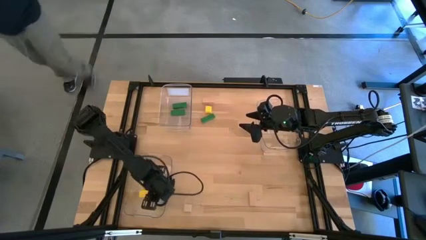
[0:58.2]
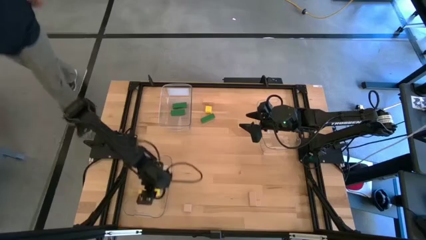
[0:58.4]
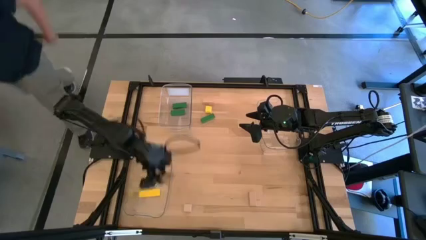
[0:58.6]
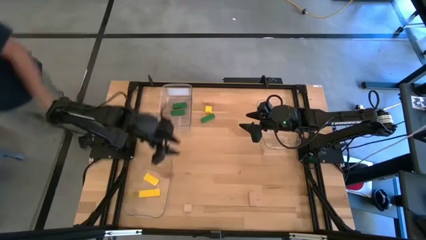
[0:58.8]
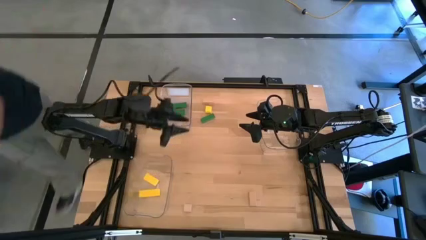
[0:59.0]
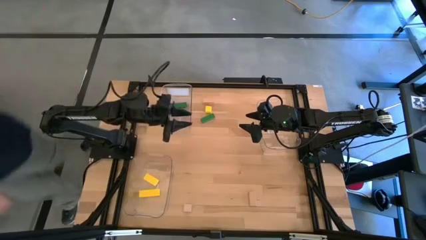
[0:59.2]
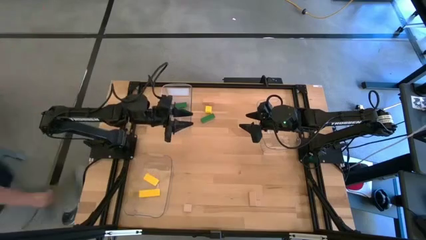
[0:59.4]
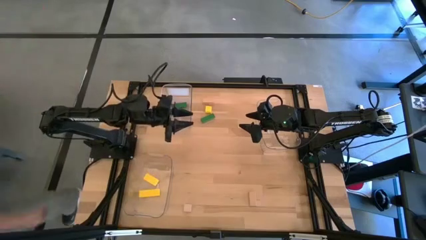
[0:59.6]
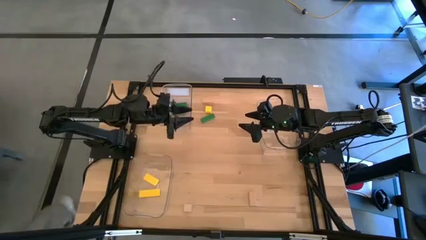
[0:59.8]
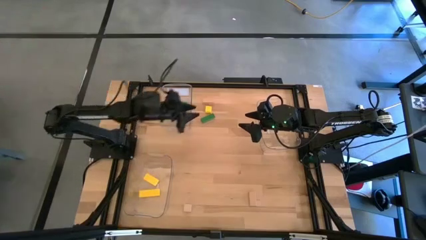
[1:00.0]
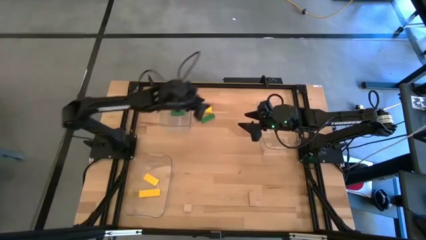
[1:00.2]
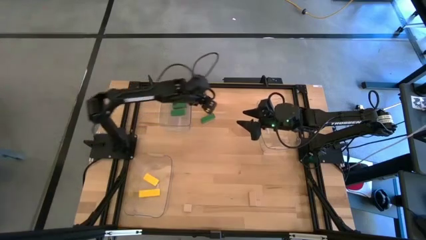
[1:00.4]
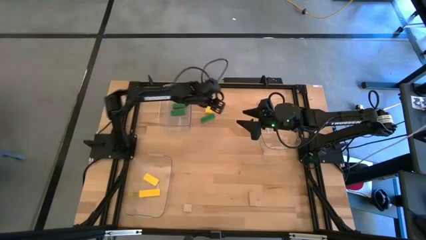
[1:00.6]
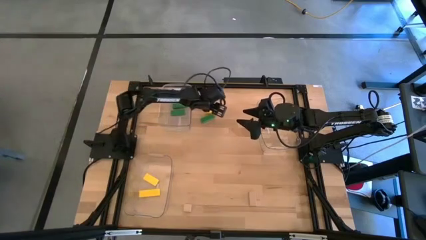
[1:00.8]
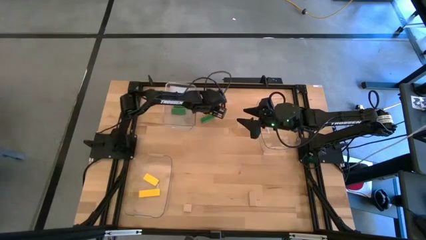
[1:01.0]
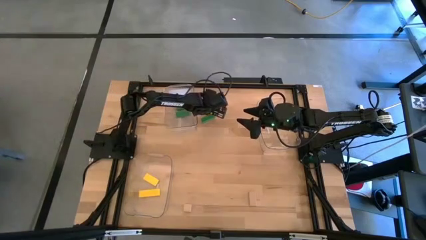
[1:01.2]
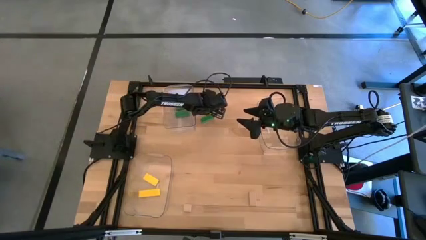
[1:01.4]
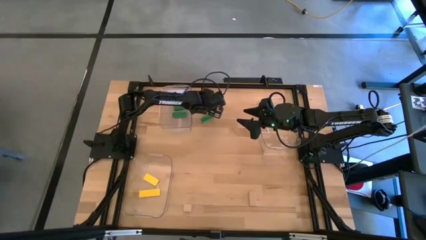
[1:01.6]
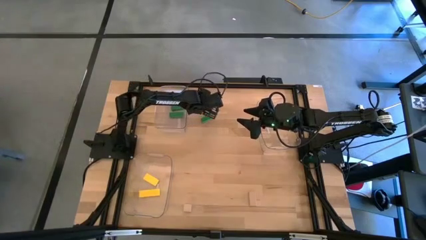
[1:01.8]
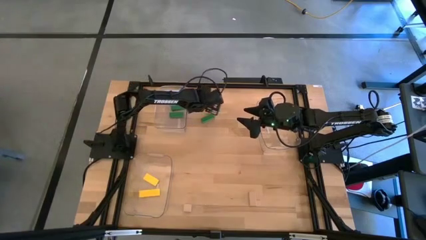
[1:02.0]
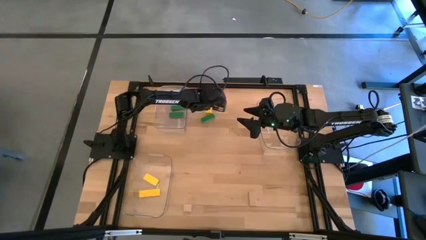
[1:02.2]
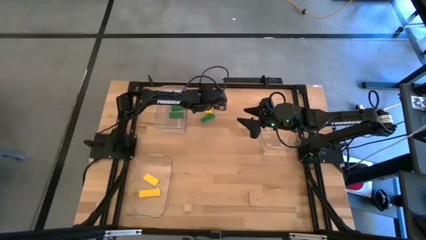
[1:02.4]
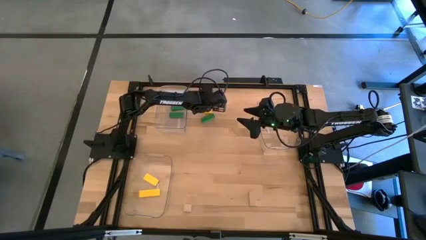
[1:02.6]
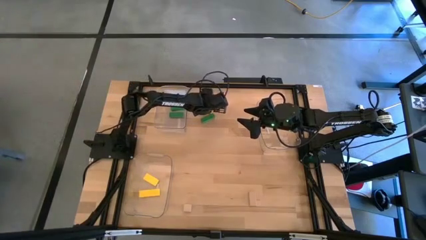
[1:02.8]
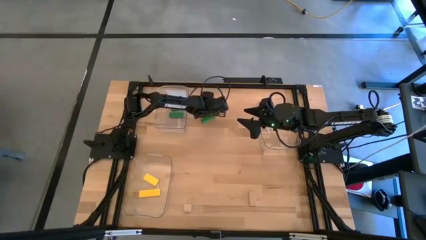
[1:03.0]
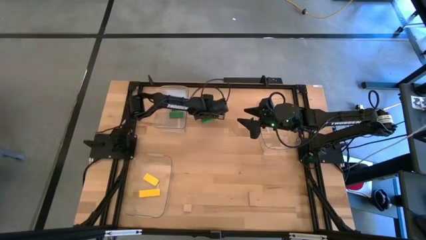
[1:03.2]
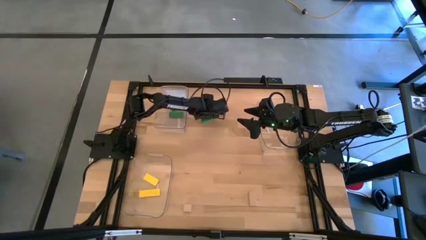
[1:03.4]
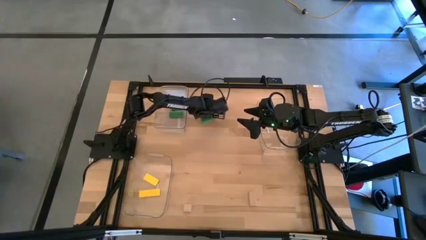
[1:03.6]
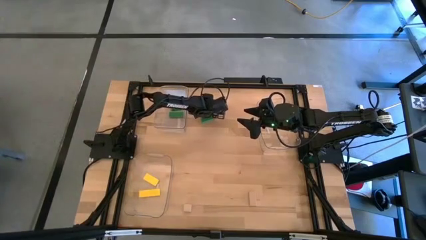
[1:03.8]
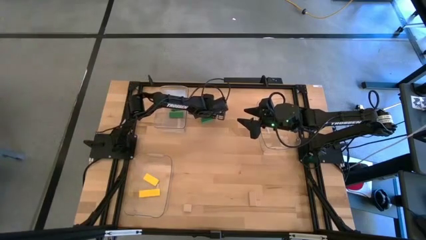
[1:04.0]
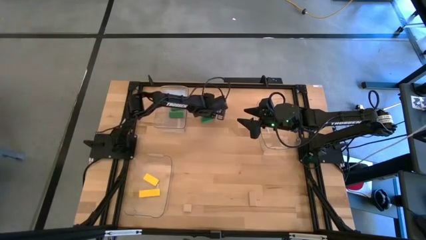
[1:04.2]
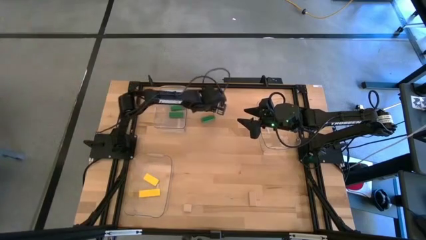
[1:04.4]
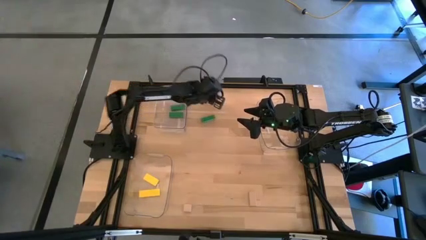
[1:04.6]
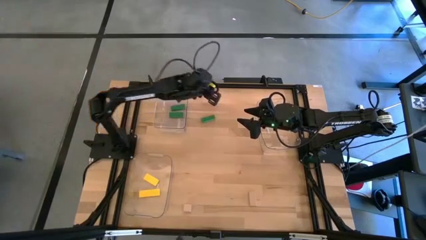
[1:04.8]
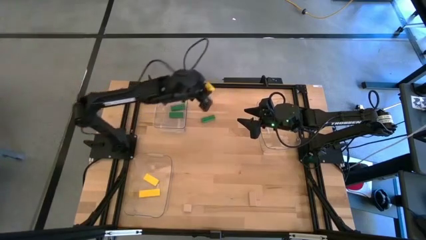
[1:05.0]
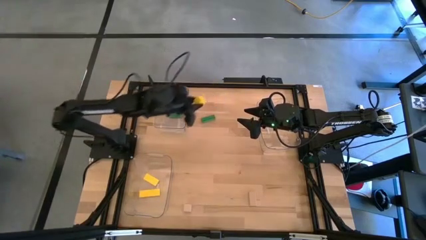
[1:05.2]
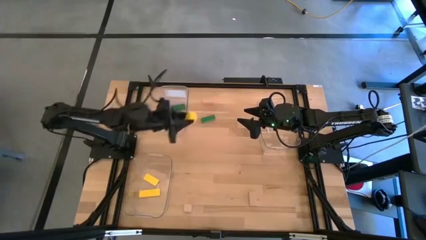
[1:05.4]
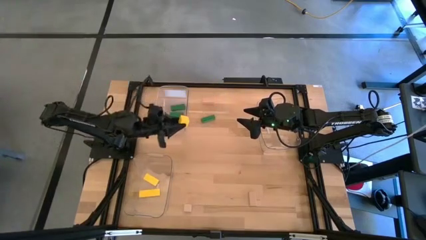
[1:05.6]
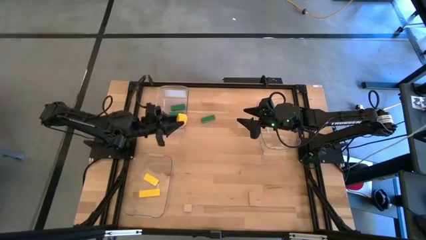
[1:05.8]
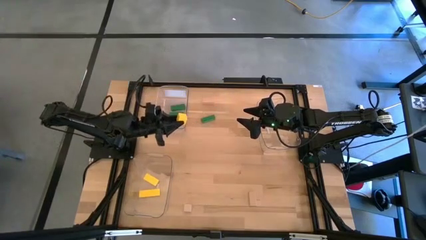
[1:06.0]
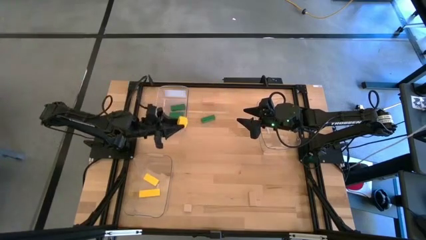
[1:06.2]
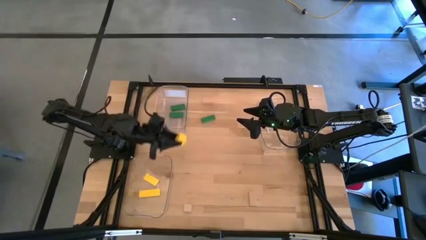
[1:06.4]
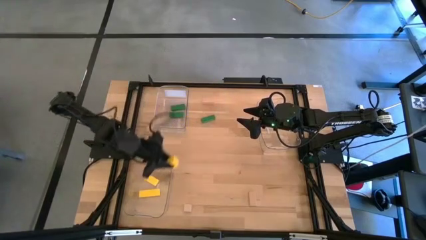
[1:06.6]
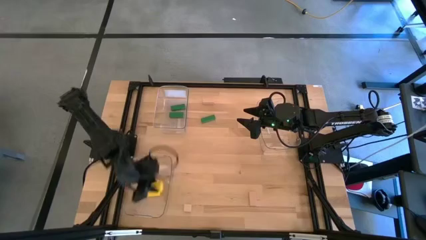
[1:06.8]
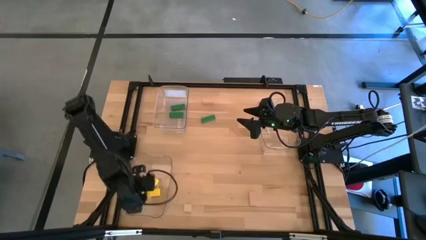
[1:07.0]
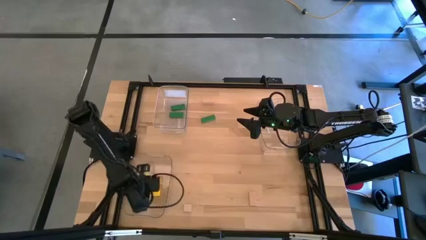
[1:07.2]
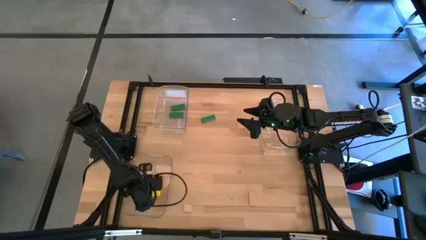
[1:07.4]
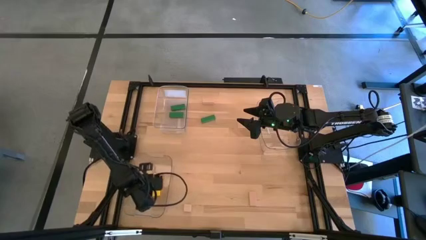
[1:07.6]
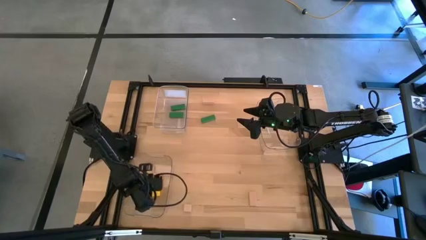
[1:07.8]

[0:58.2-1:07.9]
Task: Sort & place blocks by color
Put the yellow block into the bottom left transparent bin

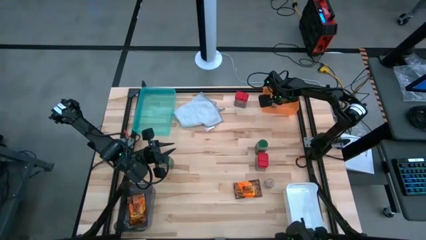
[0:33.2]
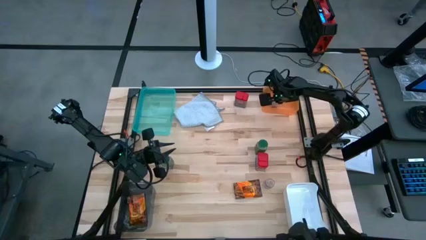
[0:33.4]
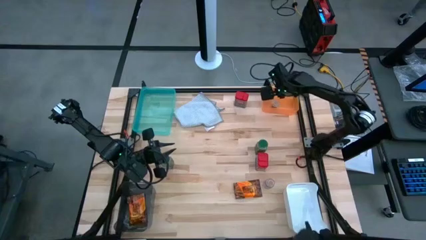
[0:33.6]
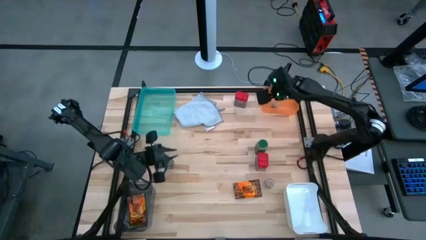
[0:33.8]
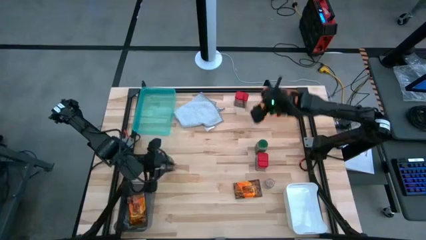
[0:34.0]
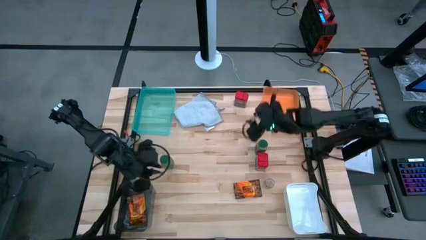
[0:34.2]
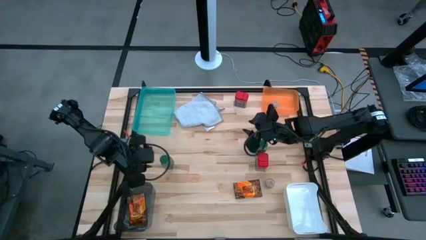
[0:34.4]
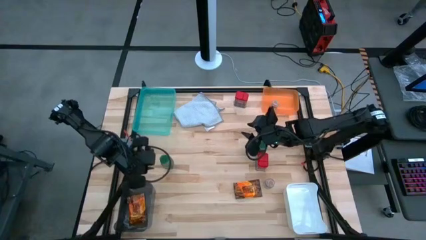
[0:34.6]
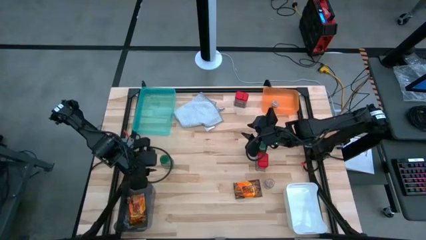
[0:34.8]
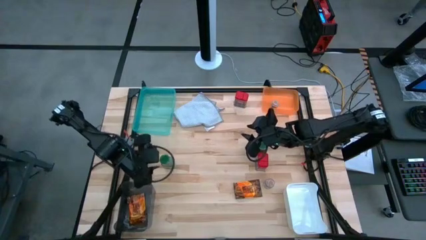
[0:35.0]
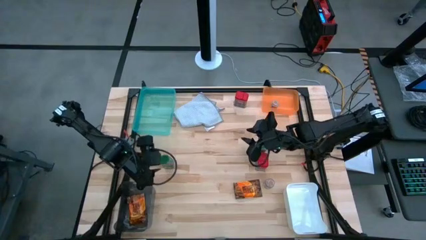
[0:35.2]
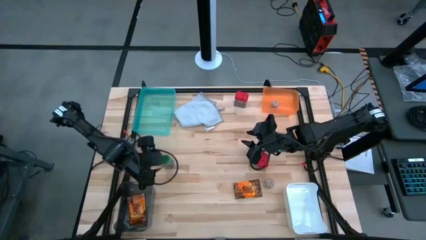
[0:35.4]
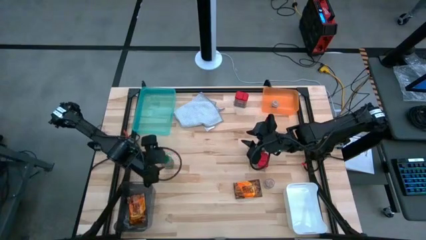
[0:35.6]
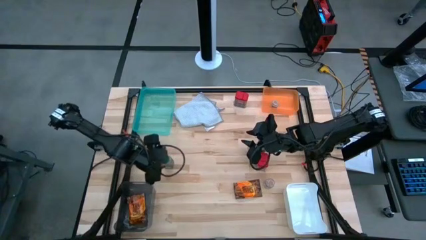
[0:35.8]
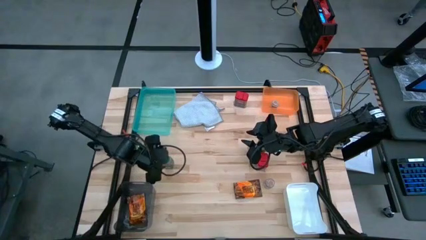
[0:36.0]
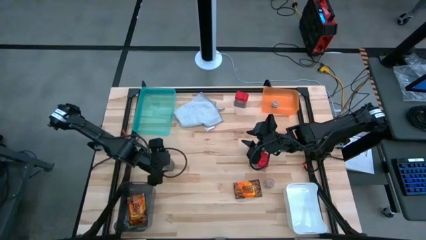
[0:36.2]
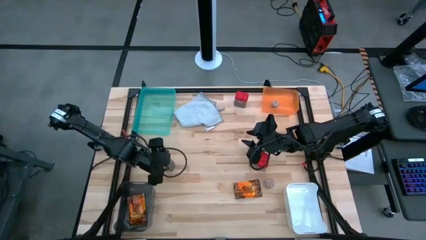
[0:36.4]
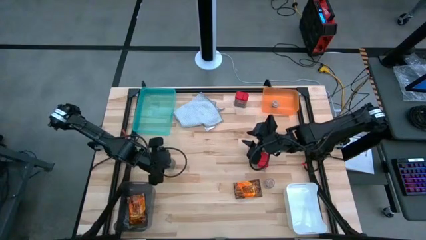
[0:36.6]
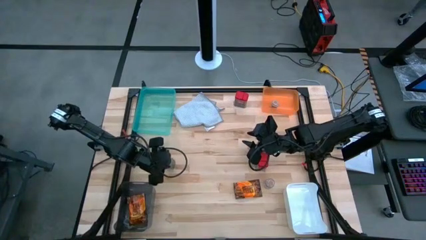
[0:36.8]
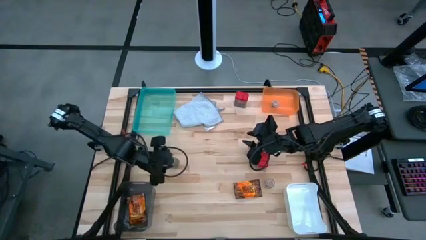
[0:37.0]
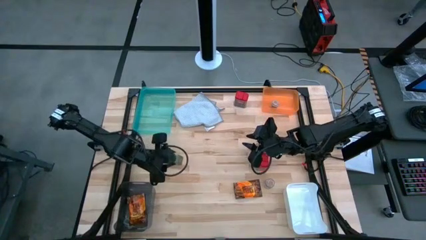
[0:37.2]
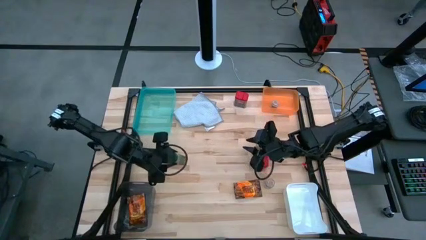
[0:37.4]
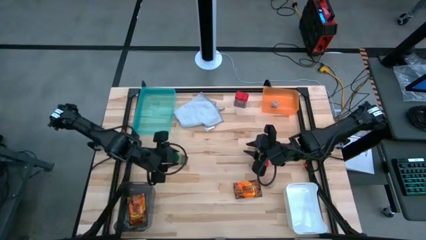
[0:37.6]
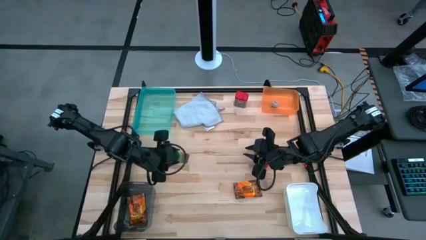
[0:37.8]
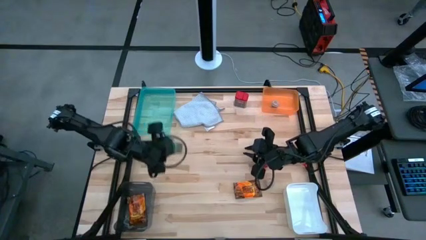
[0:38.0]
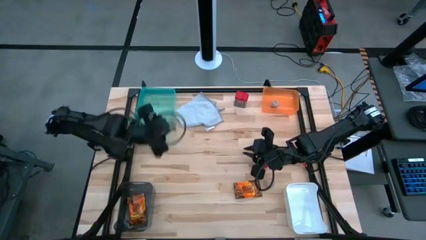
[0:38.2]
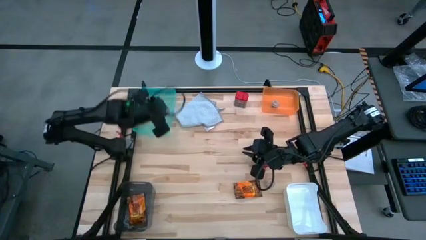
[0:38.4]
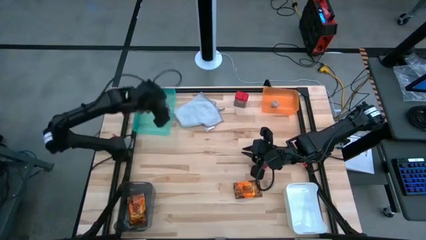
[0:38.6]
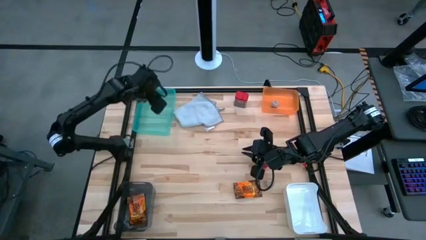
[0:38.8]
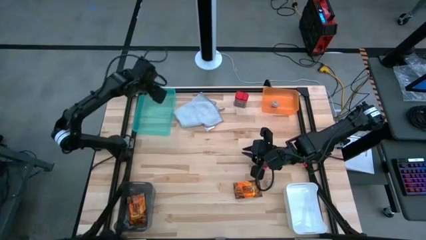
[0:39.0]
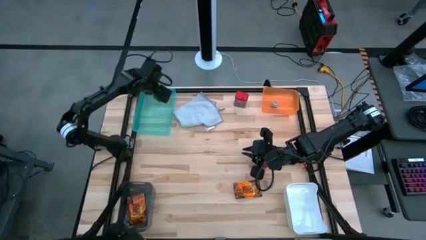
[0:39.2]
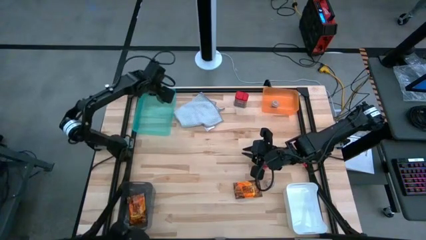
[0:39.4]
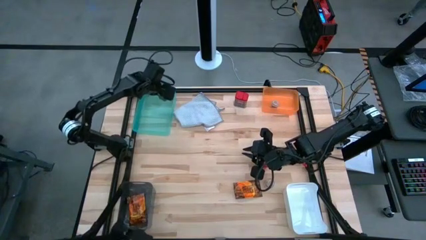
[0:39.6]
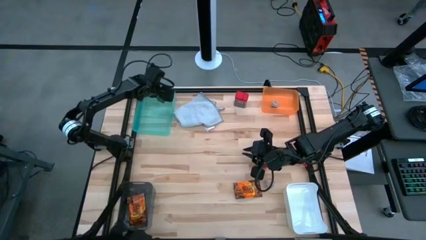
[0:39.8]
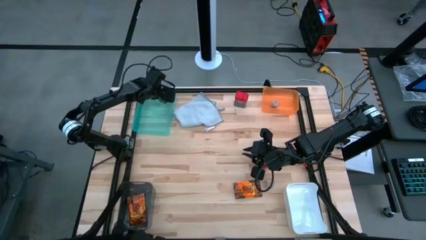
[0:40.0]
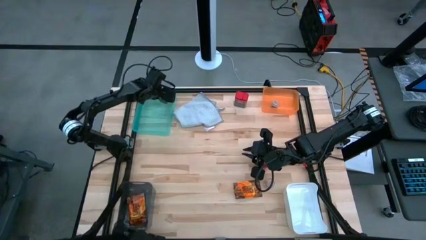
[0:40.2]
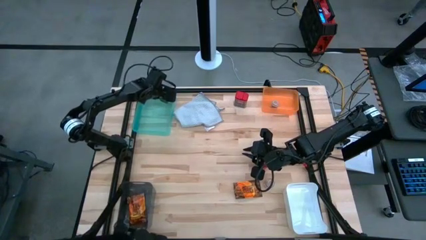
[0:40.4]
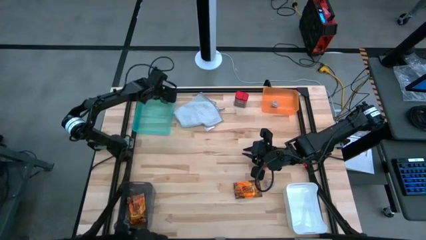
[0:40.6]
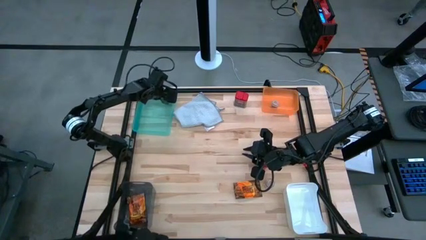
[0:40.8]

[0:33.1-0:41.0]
Task: Sort spices by type
Put the left green seasoning bottle into the blue bin
